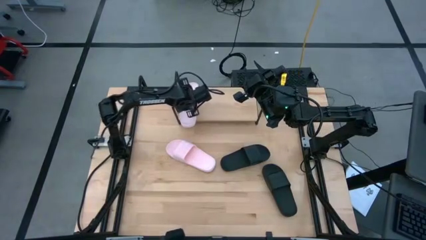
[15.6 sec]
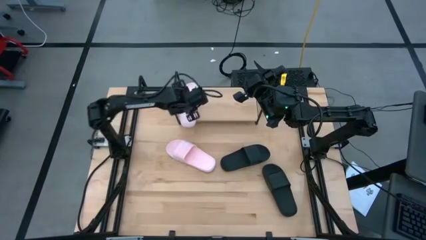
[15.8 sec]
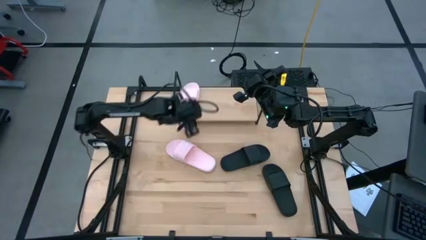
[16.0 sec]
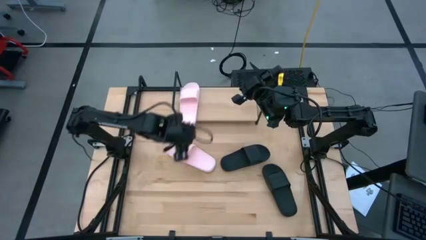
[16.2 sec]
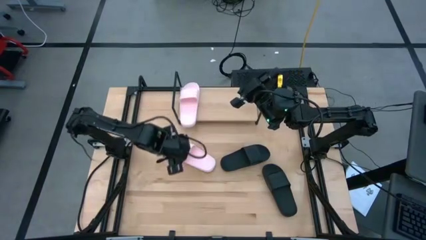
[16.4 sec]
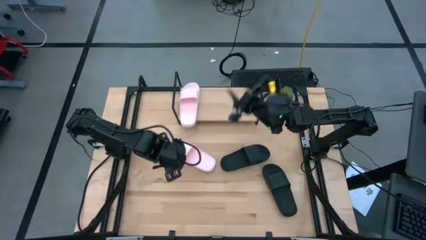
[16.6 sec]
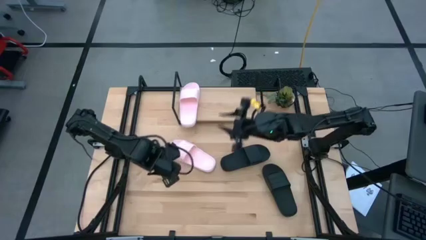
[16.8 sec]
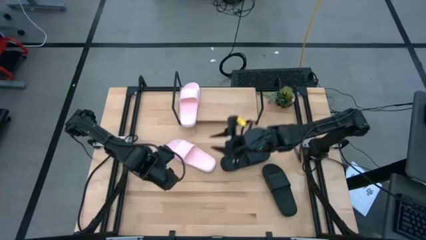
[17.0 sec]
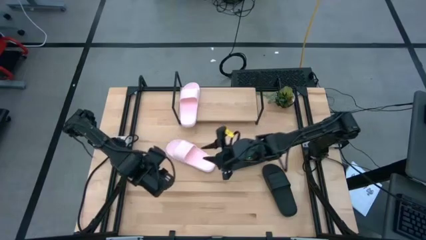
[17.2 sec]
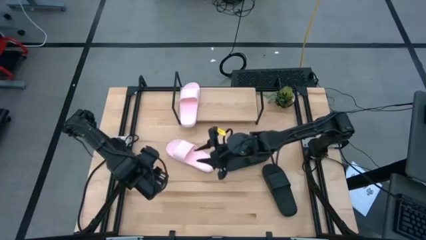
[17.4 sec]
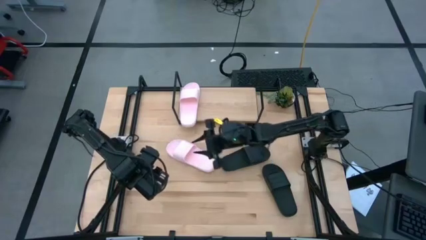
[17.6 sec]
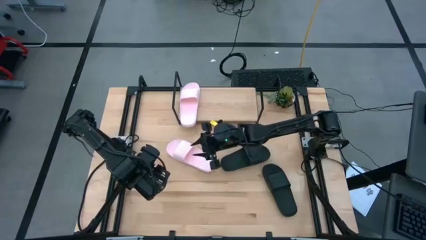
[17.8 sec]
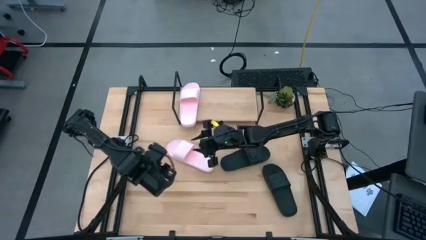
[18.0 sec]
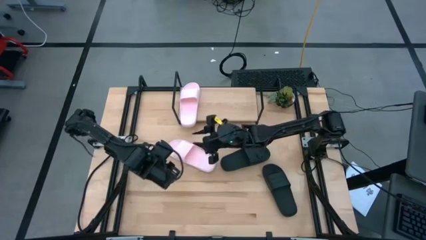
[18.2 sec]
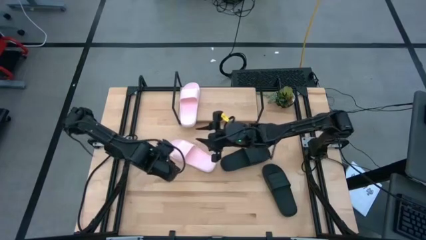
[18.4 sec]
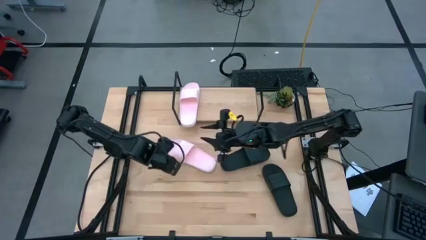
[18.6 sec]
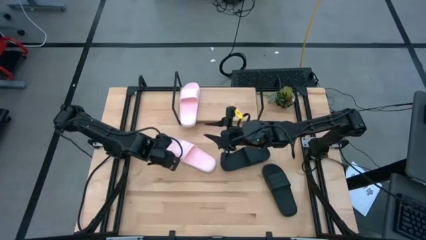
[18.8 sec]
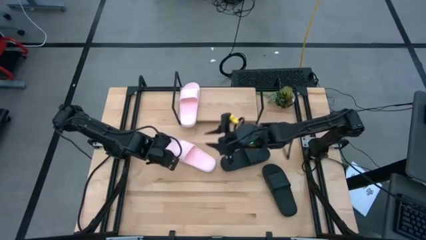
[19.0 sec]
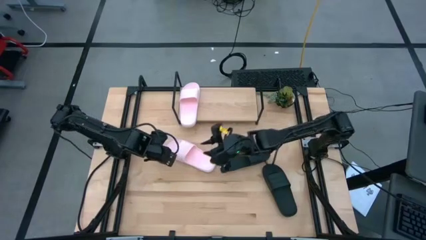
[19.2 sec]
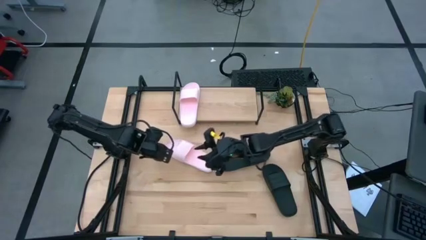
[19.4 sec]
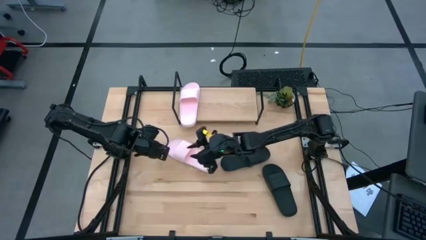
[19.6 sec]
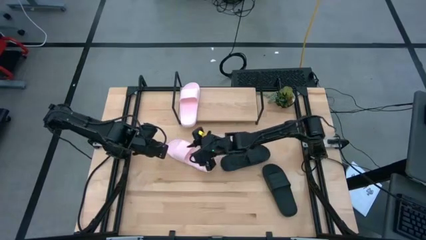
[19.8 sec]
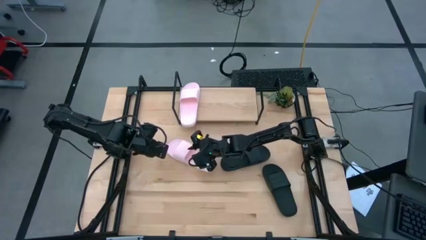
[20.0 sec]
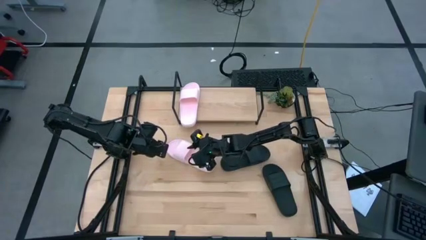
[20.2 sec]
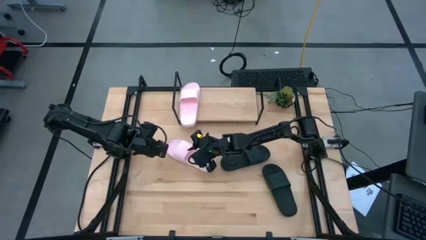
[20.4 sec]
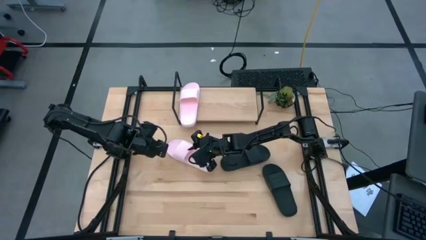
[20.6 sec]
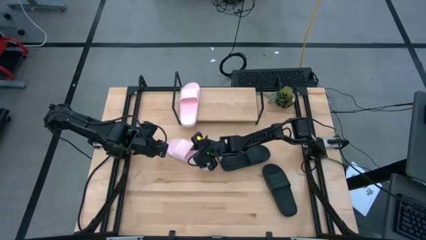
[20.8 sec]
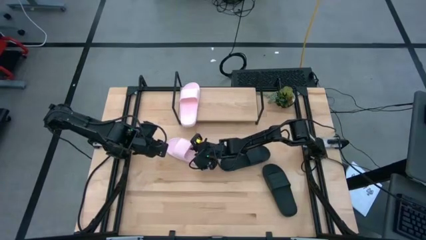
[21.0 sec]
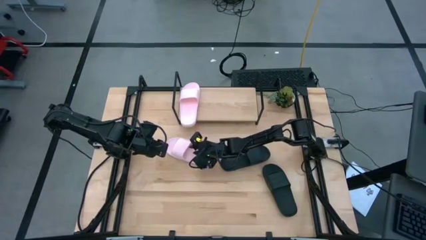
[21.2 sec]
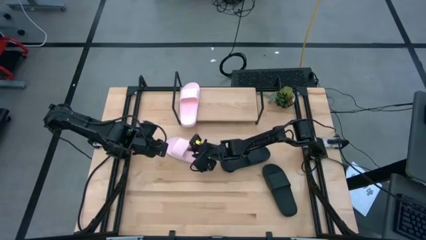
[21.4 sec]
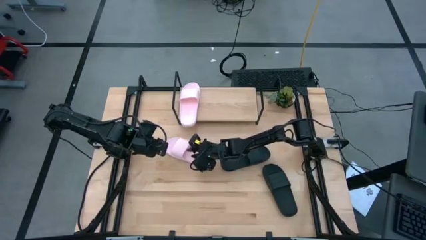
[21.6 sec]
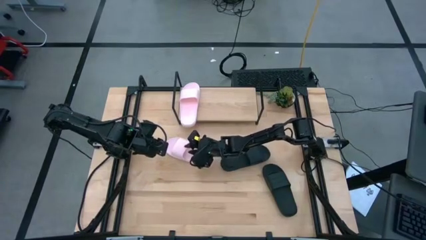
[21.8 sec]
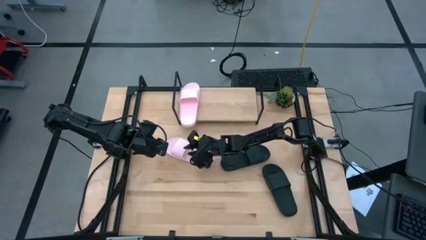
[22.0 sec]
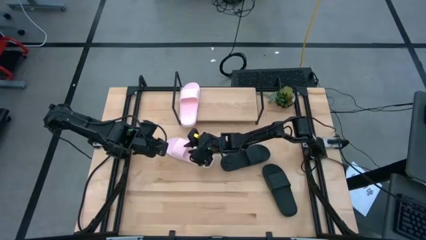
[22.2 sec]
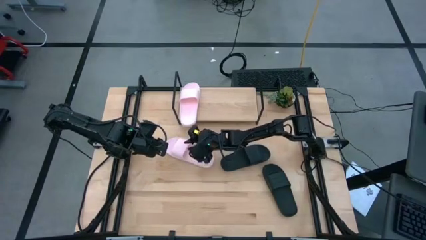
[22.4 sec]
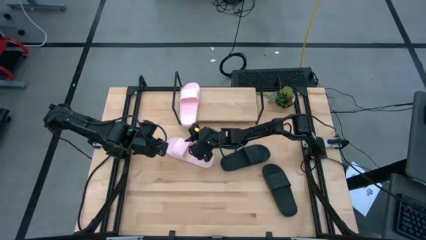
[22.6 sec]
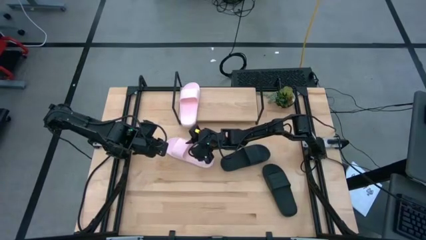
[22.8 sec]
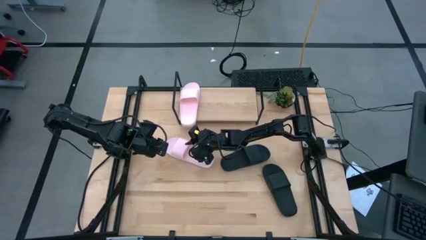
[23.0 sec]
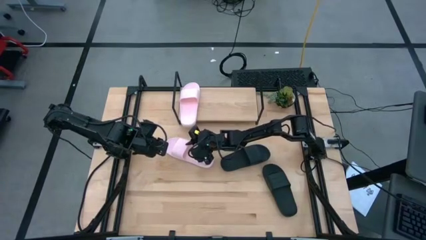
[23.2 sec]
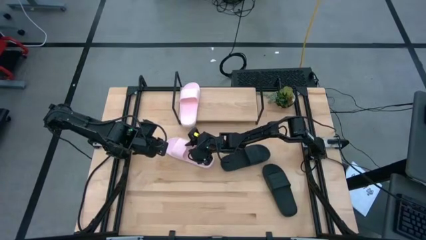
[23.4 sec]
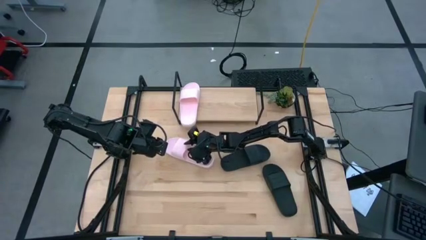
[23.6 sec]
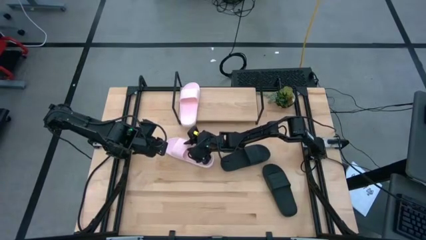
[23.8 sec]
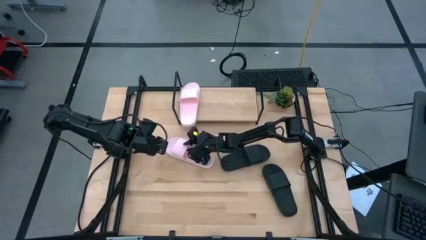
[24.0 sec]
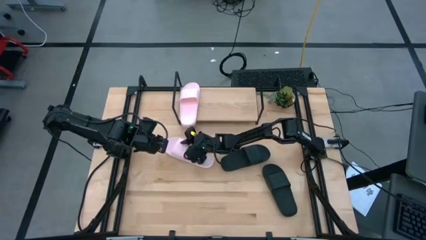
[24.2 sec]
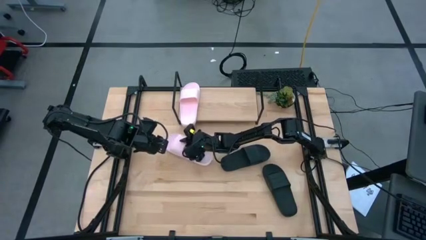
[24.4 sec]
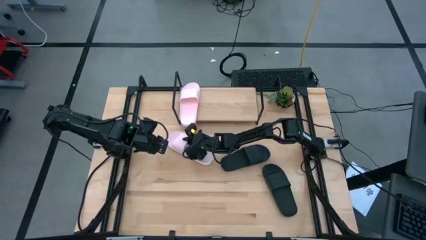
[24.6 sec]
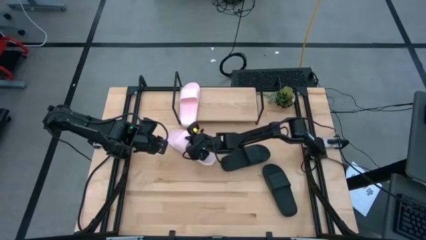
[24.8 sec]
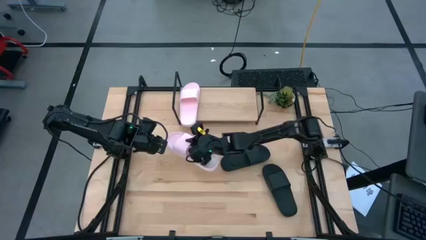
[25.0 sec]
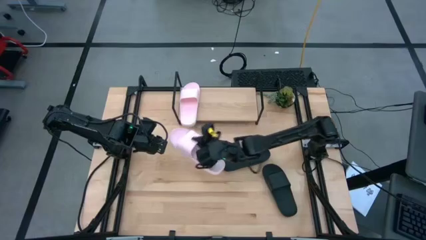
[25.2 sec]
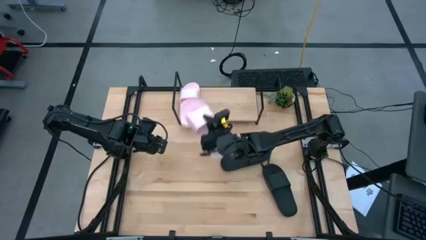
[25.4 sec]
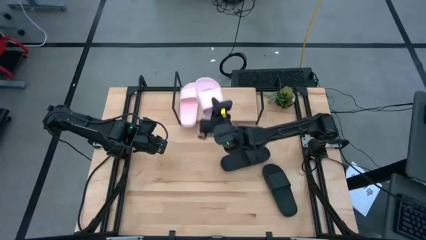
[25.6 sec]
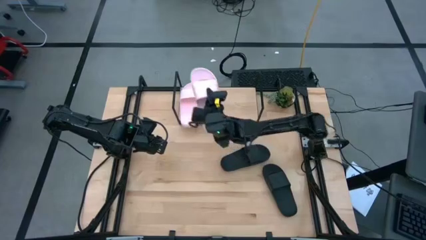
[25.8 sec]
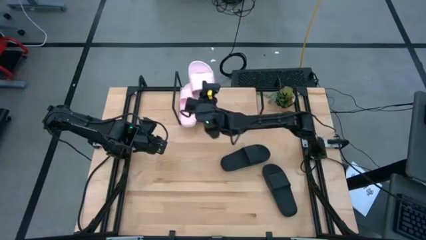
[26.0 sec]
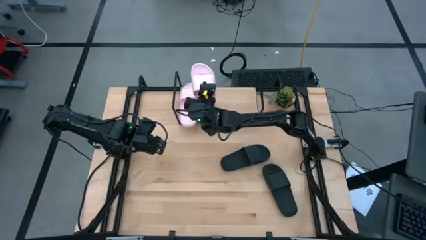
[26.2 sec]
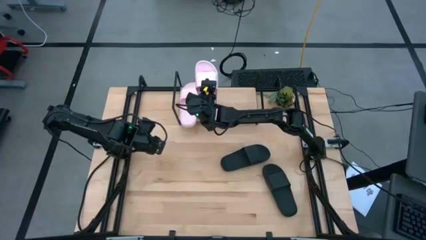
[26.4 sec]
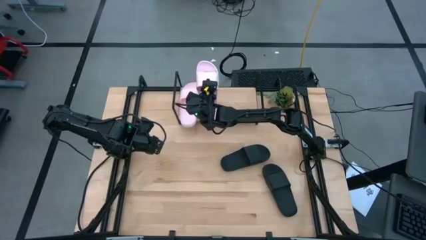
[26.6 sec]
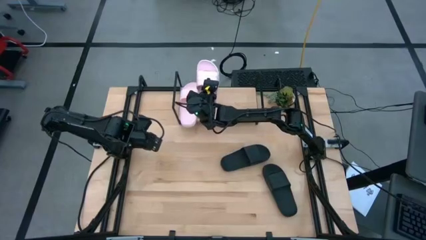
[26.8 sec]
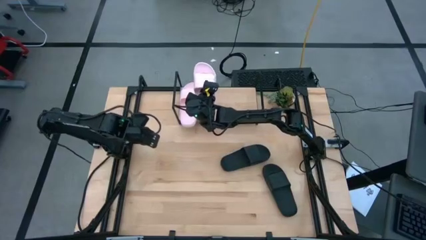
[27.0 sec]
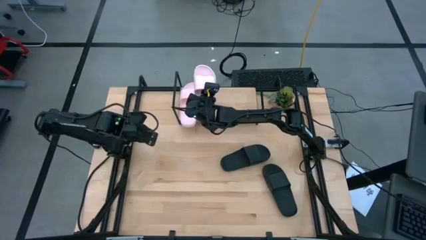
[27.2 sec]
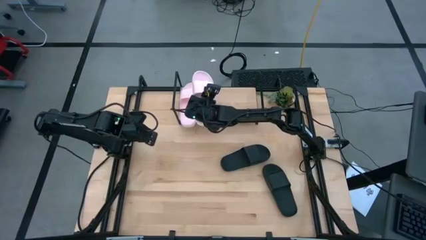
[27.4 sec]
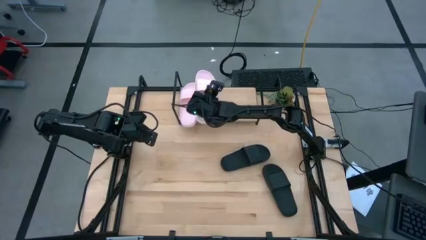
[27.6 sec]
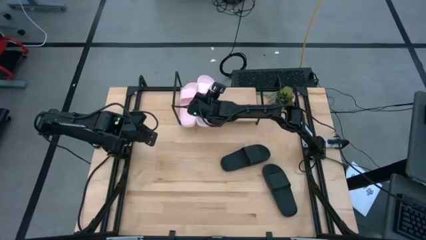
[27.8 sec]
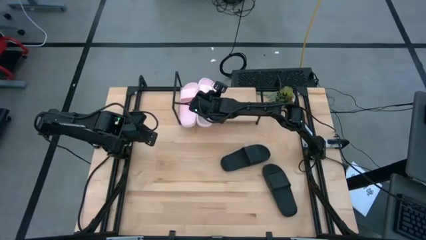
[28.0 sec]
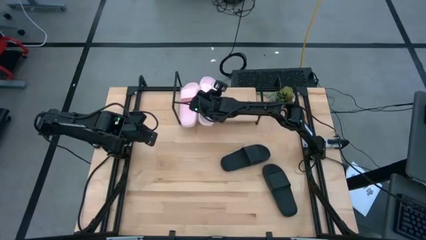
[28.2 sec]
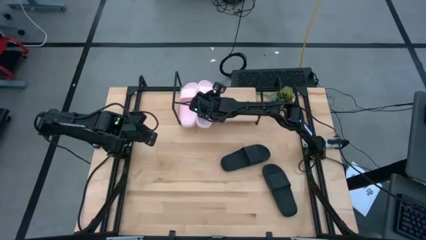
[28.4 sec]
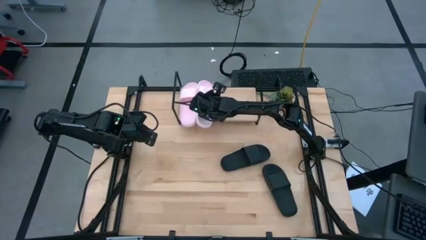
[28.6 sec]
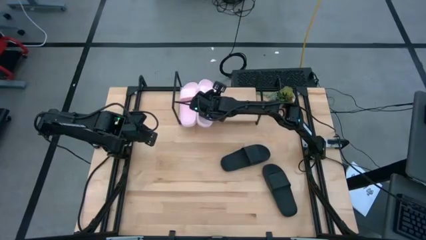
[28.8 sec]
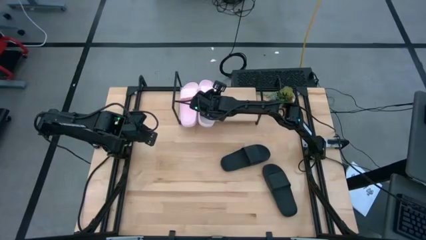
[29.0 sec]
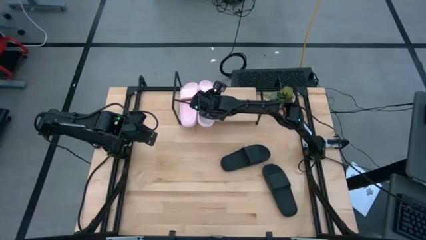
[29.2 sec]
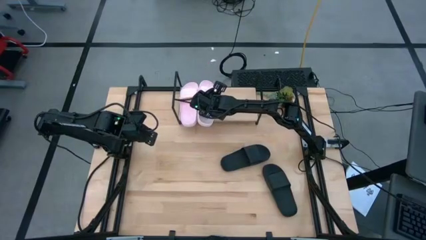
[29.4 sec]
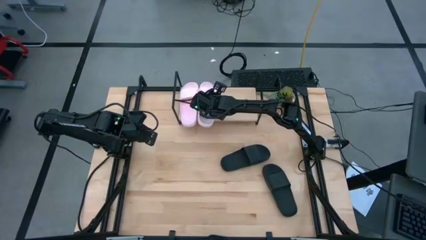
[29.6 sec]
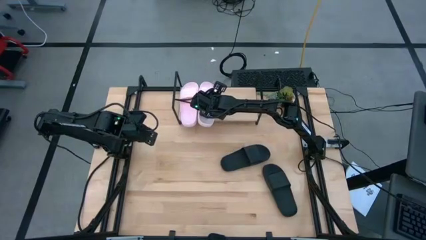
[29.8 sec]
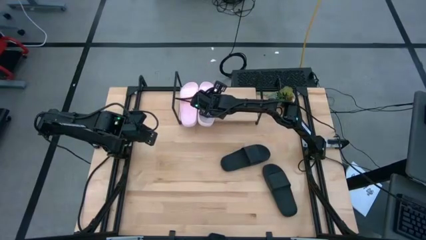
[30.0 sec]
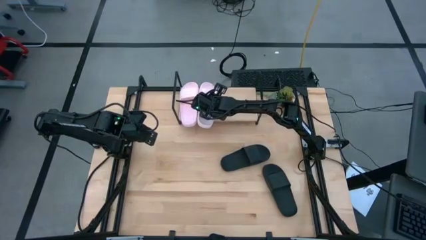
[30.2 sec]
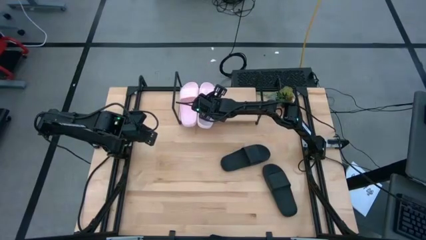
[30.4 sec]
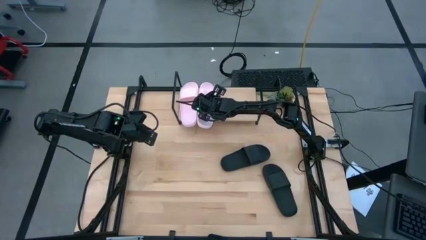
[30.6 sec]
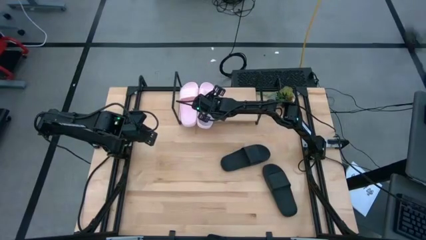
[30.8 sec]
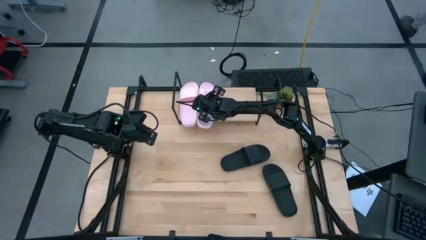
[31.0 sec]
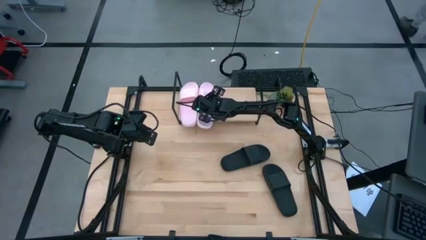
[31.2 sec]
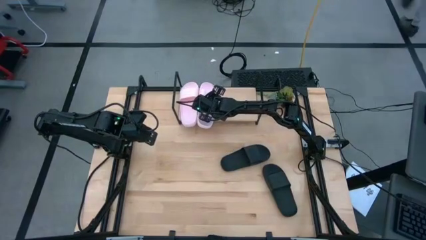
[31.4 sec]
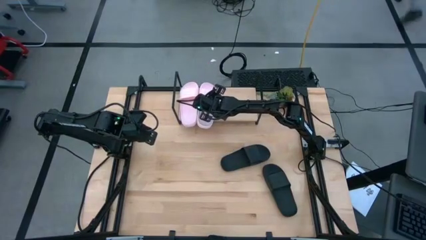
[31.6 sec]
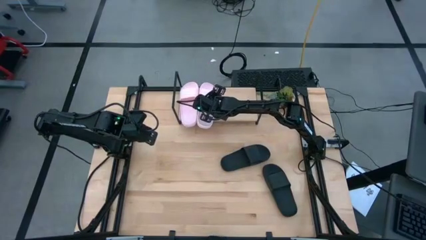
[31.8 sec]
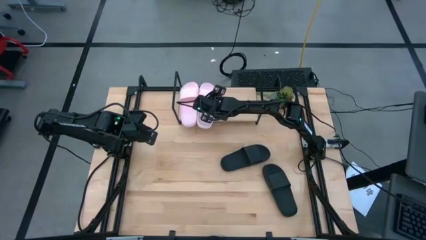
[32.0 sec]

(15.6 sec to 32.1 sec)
Task: Pick and place slides into the shelf
Put the pink slipper on the shelf
